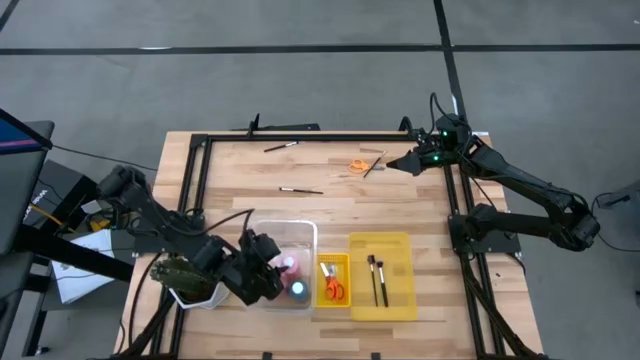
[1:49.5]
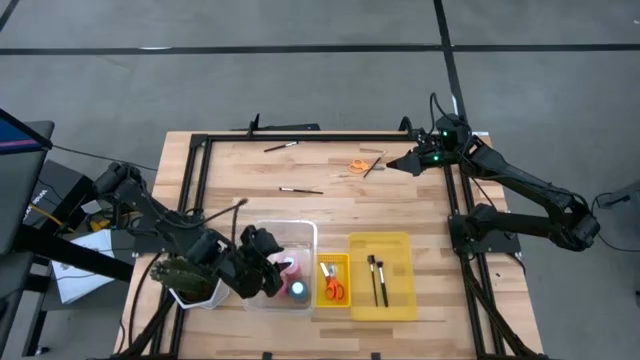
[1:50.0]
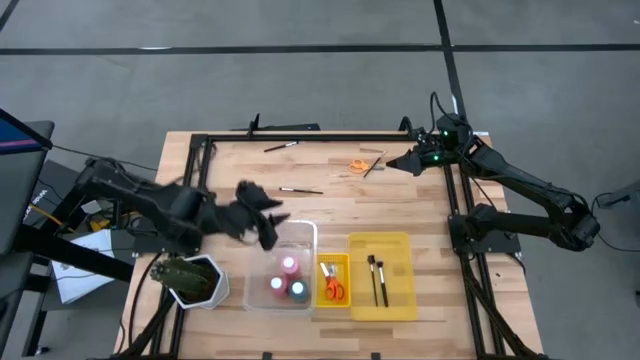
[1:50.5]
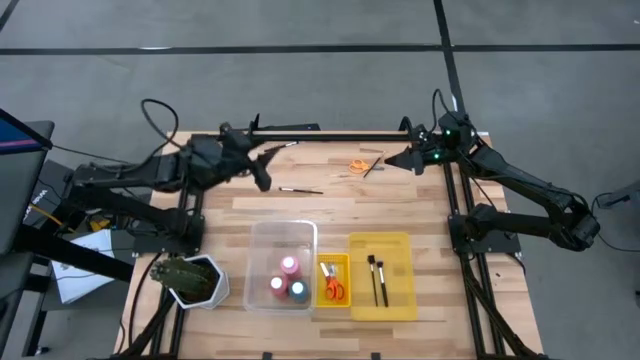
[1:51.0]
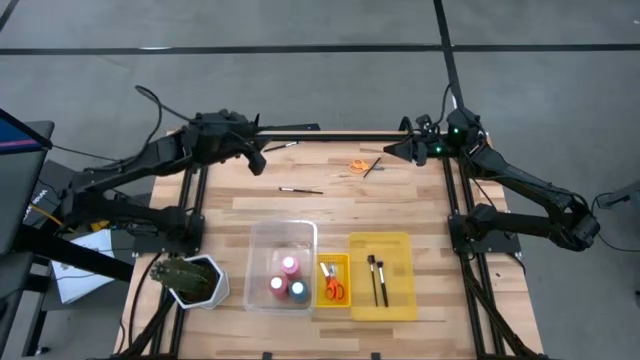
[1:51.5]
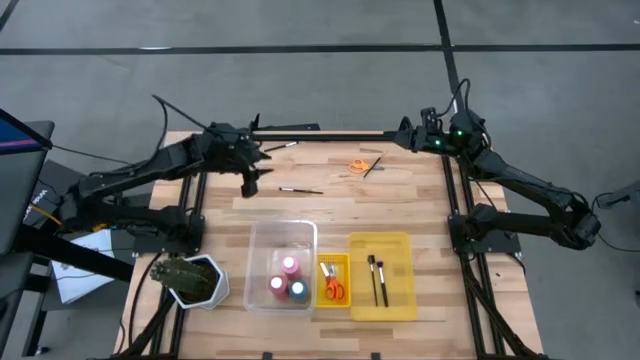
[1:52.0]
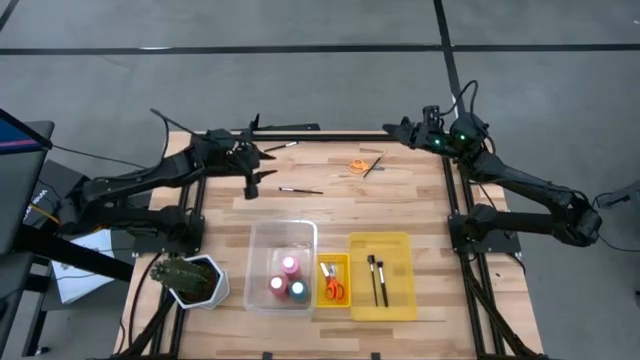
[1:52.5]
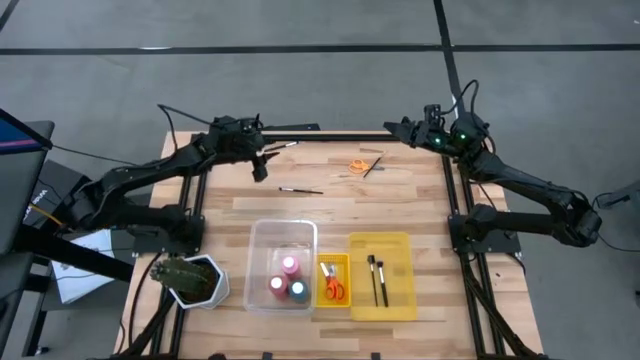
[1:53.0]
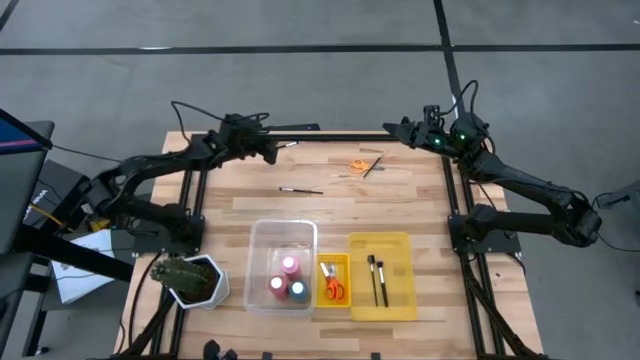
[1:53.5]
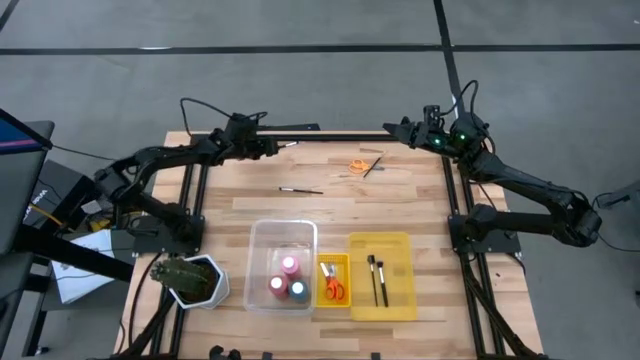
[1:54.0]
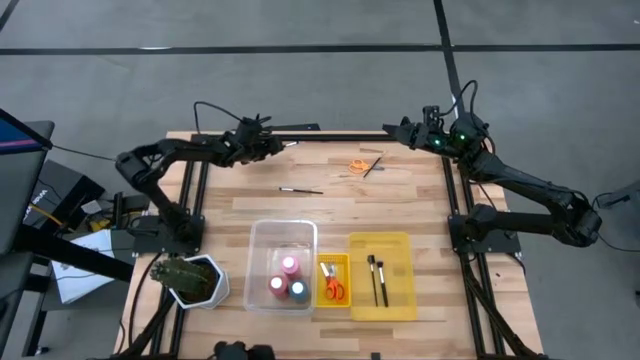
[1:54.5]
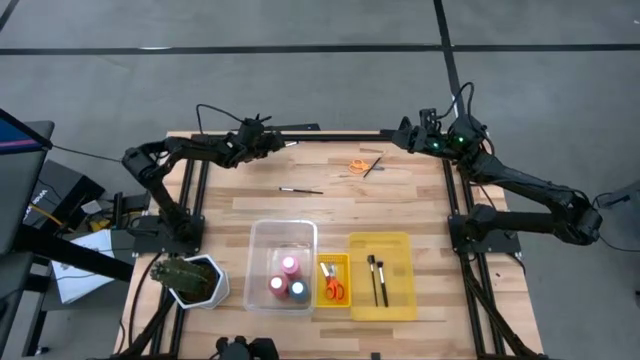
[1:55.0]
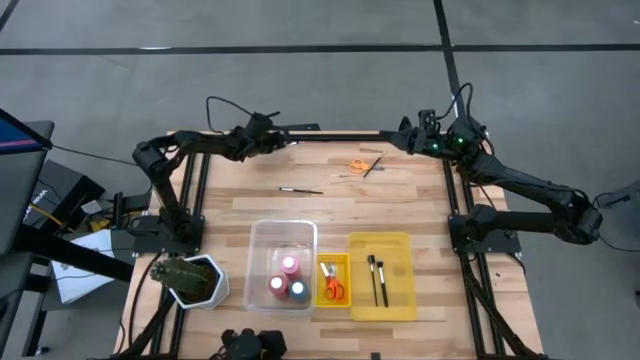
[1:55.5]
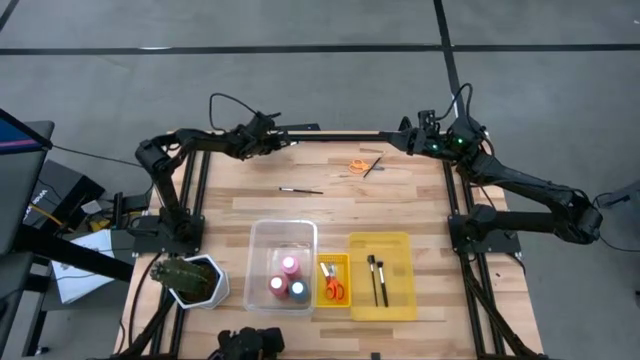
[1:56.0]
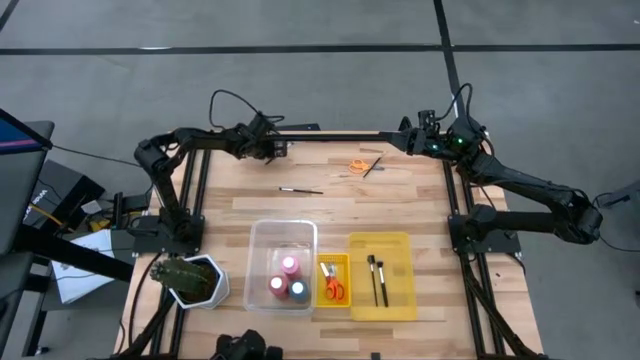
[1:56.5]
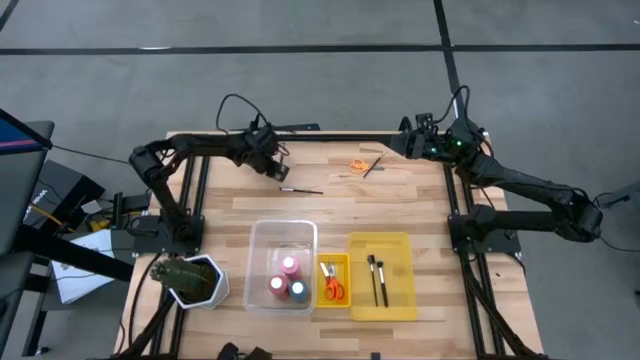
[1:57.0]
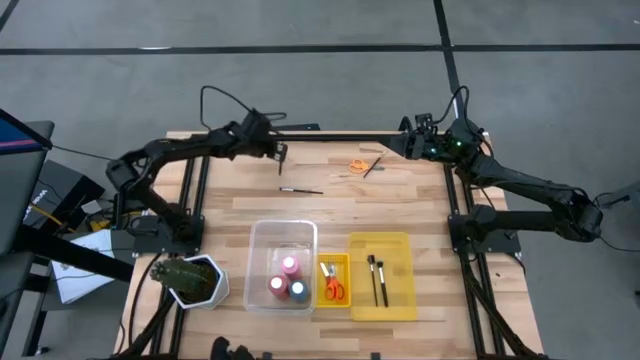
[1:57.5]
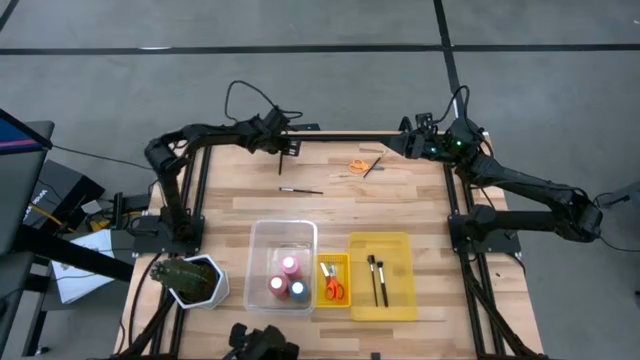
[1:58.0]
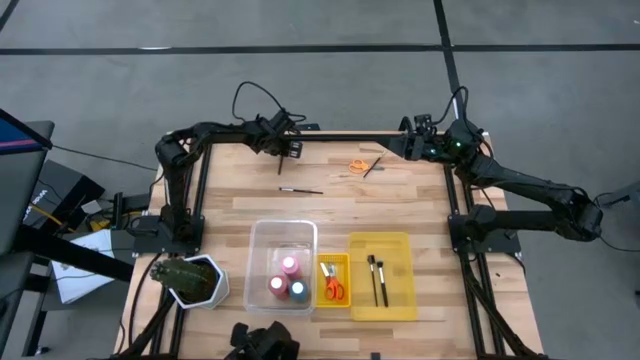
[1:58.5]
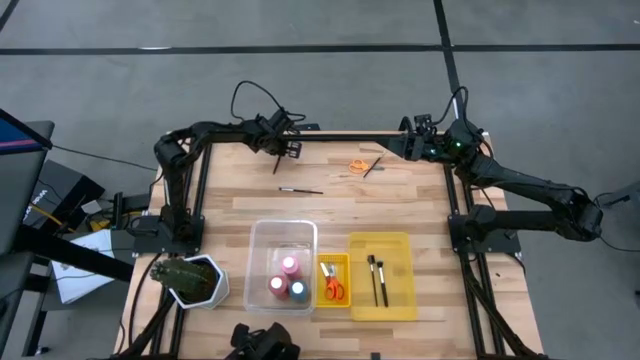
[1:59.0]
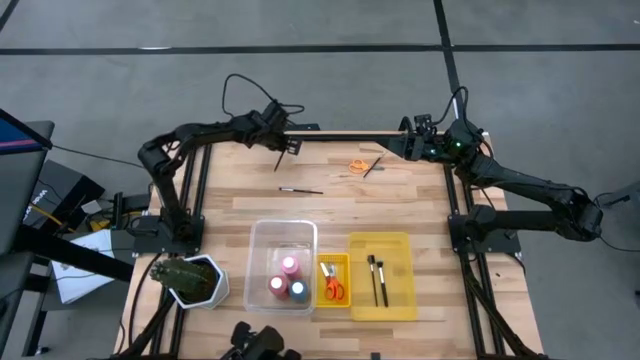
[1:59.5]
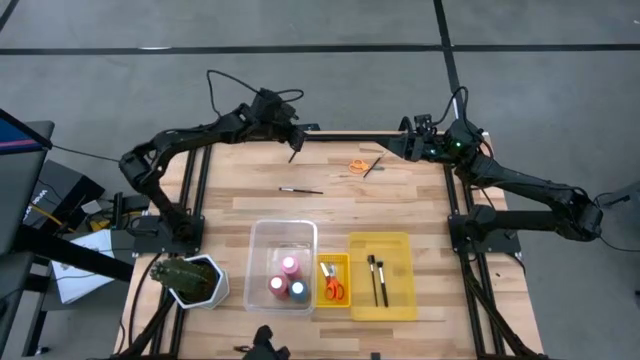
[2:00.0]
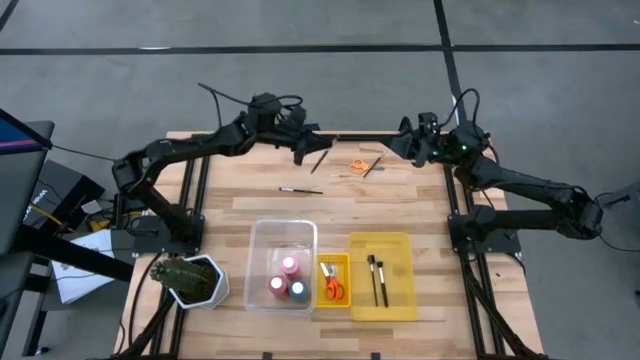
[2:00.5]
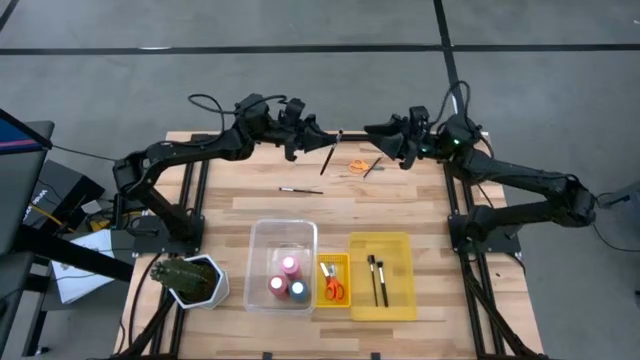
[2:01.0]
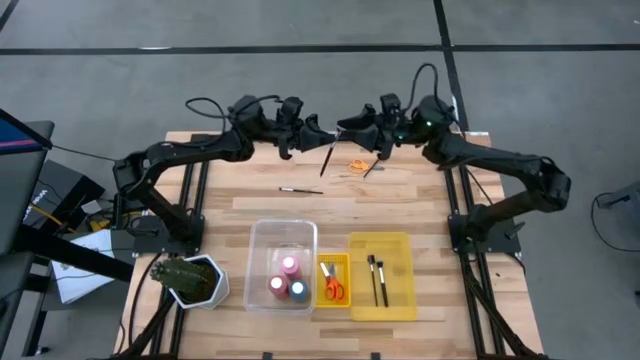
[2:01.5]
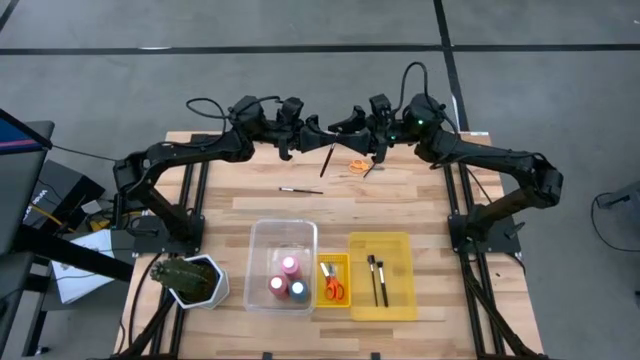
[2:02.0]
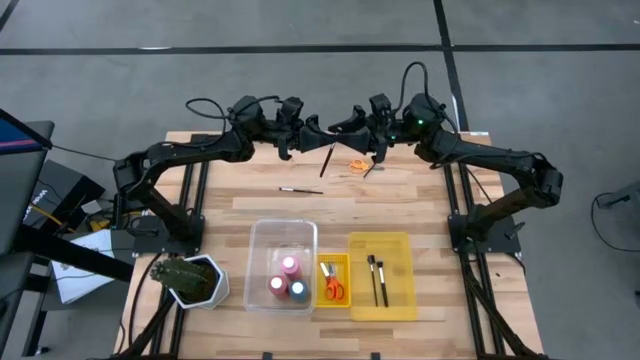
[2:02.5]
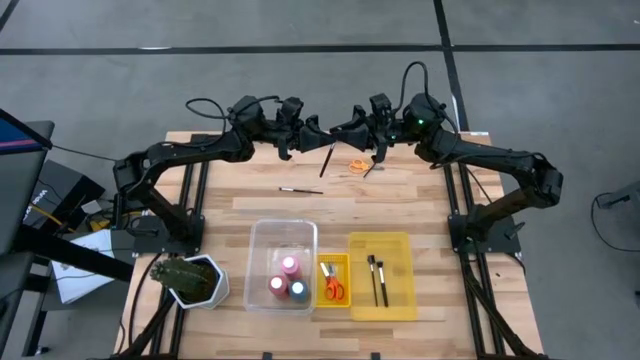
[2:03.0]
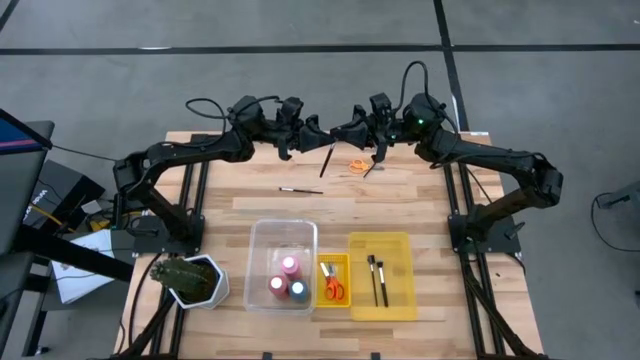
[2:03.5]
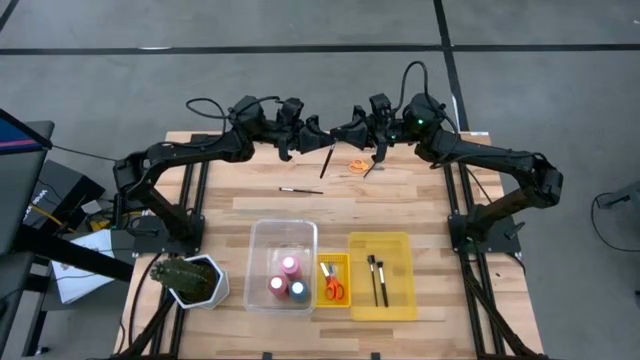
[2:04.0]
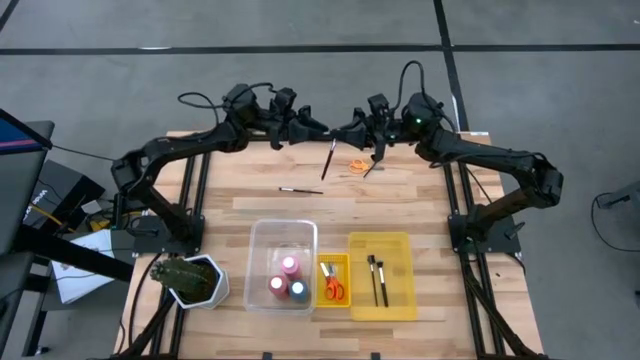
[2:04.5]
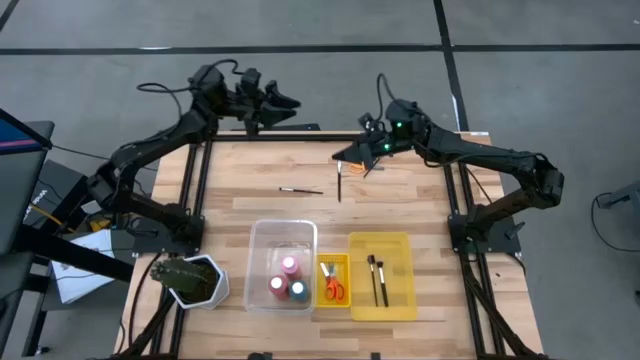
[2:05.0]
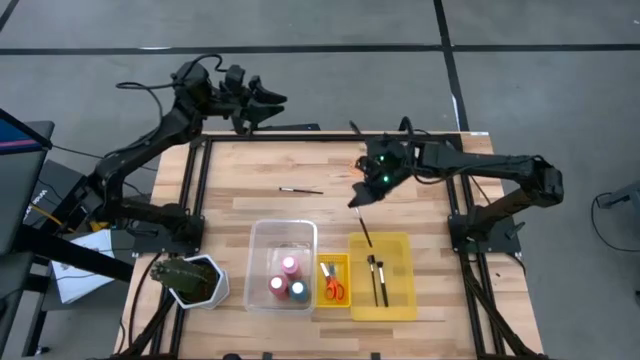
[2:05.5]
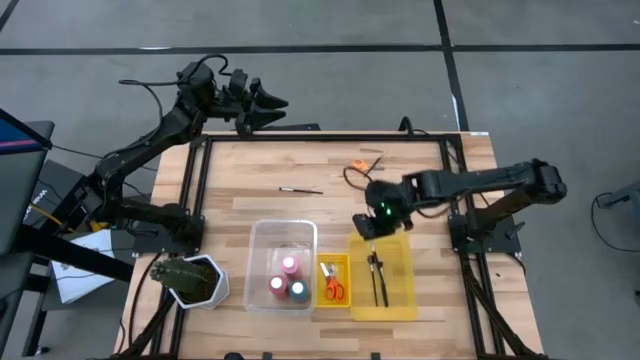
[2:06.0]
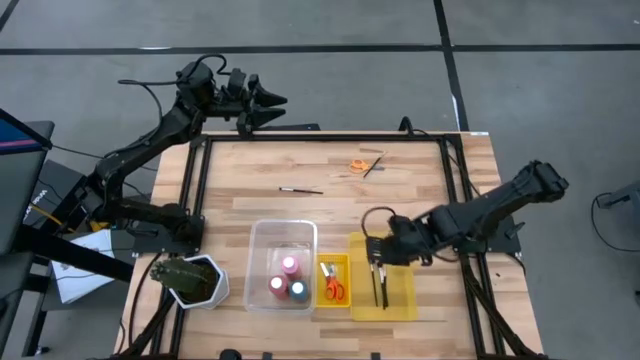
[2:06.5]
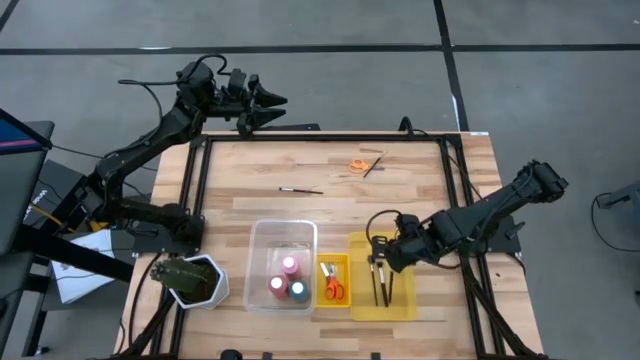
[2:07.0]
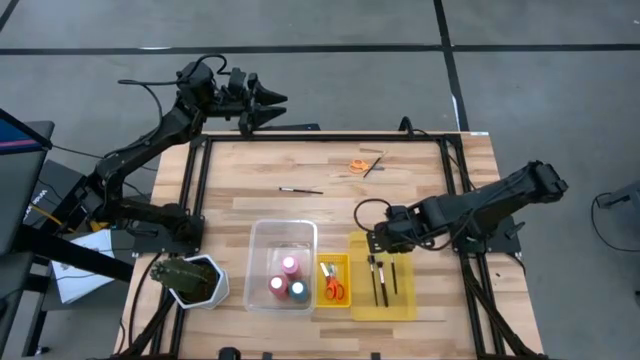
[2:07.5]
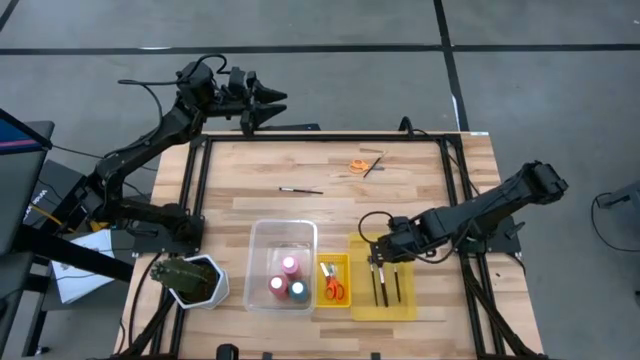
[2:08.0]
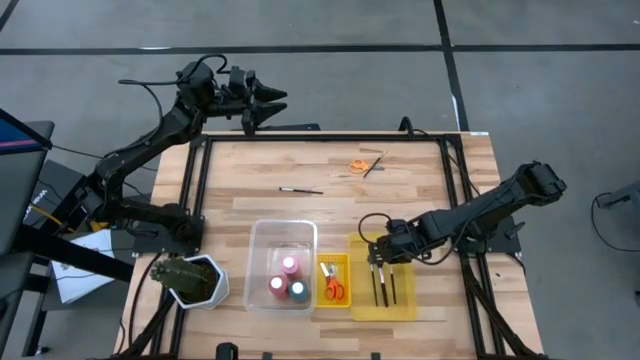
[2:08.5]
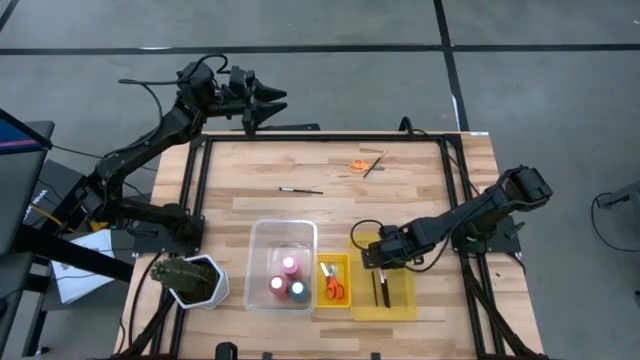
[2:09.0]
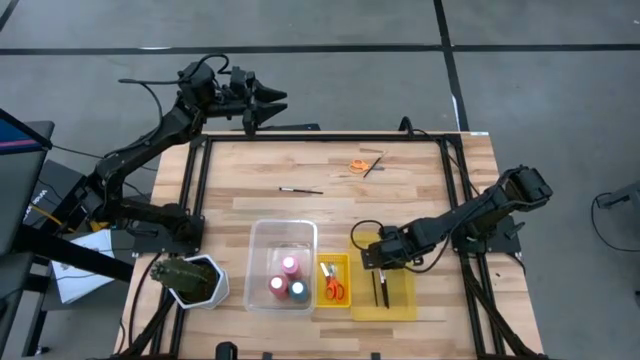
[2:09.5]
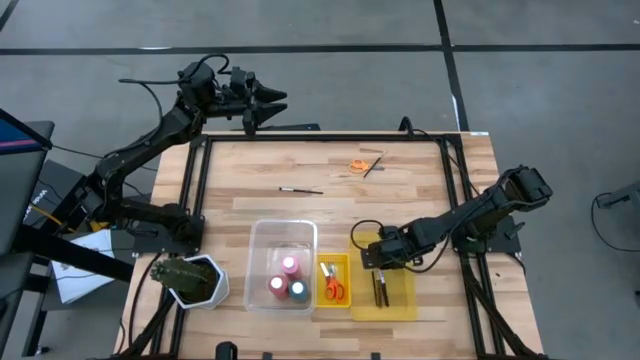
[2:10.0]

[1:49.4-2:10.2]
Task: Pick & Place Paint Supplies
Put the black paint brush into the right yellow bin
